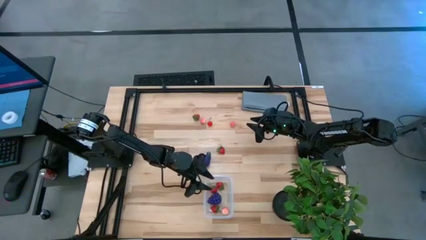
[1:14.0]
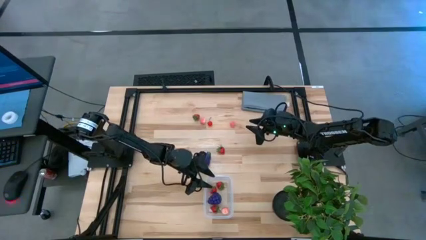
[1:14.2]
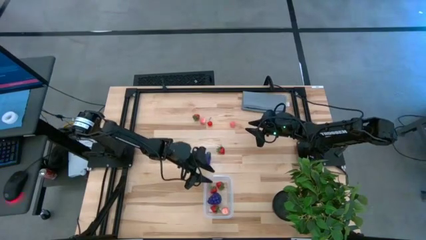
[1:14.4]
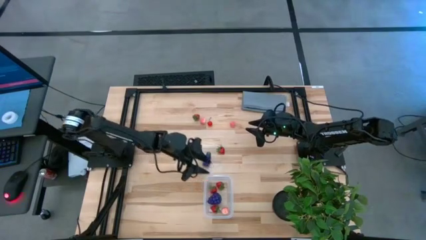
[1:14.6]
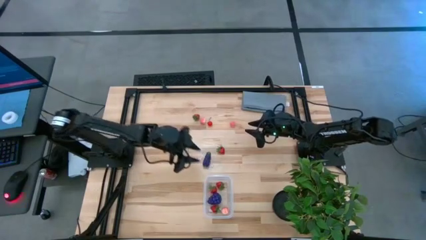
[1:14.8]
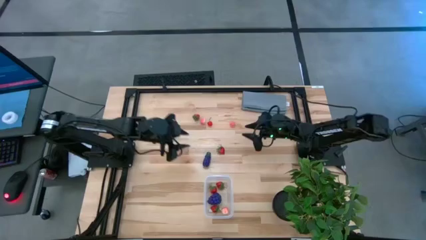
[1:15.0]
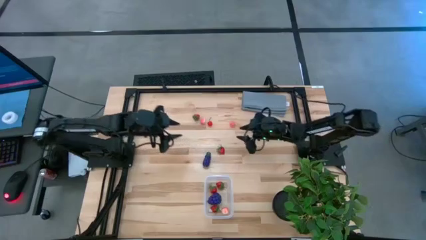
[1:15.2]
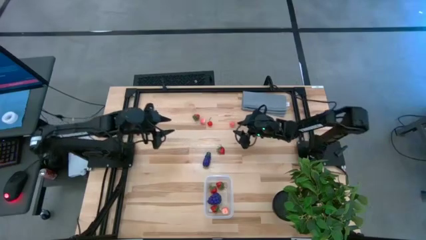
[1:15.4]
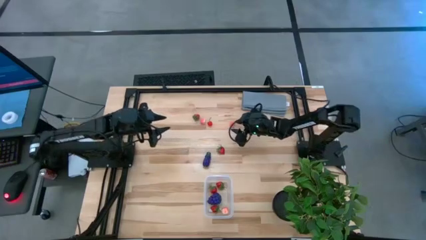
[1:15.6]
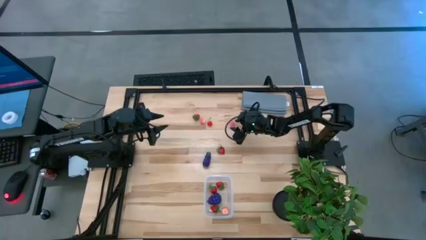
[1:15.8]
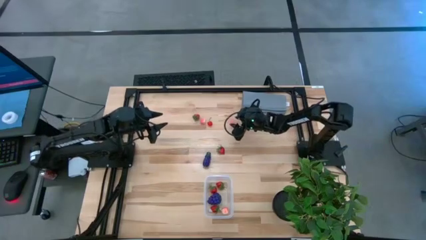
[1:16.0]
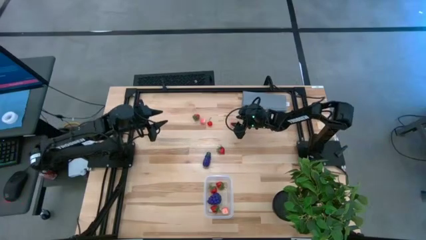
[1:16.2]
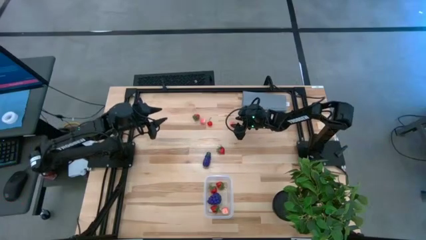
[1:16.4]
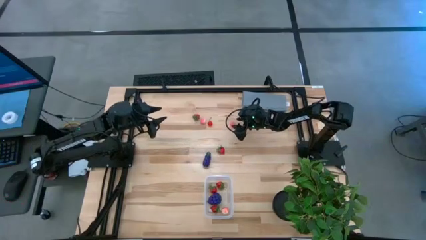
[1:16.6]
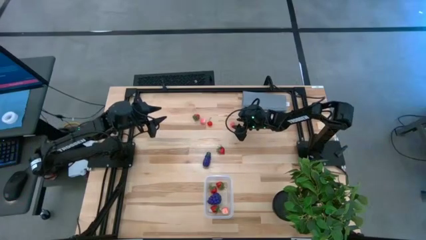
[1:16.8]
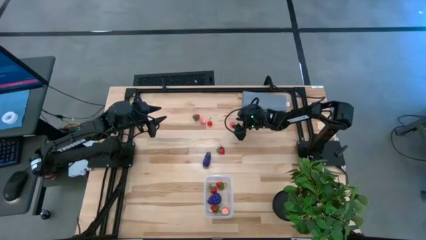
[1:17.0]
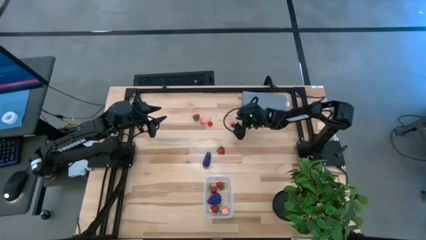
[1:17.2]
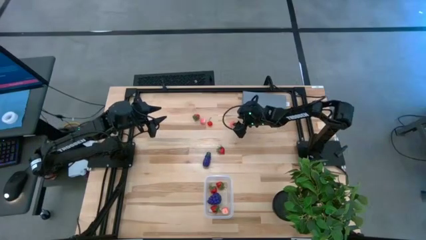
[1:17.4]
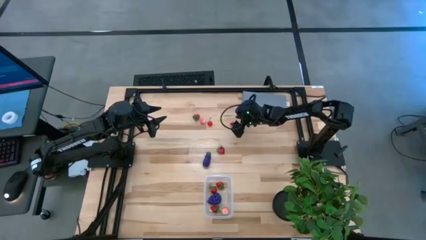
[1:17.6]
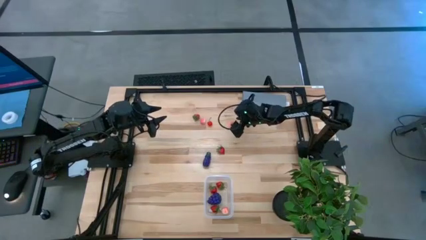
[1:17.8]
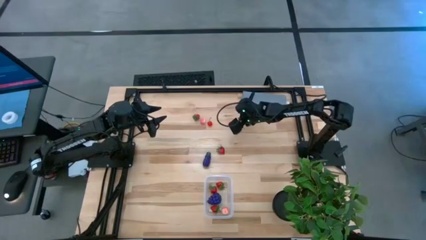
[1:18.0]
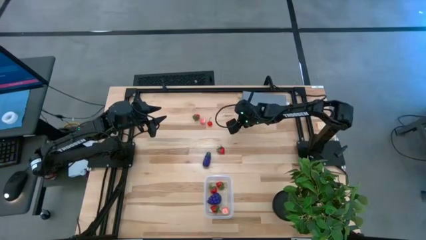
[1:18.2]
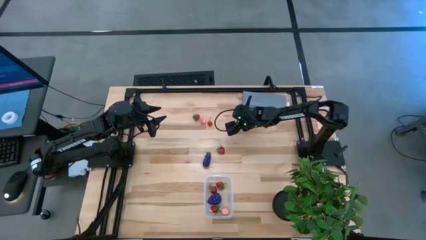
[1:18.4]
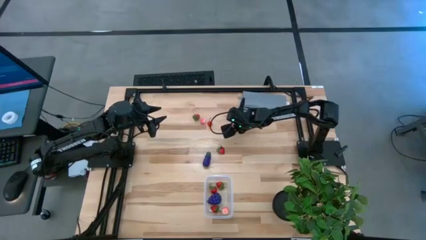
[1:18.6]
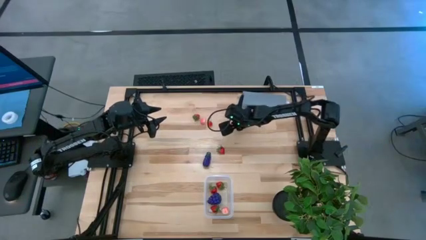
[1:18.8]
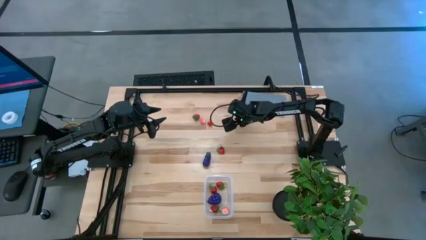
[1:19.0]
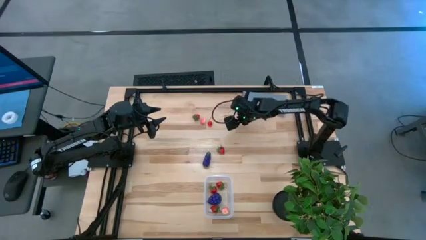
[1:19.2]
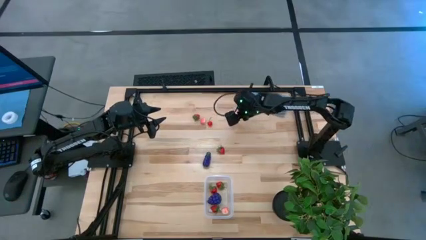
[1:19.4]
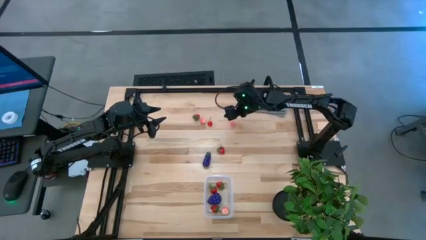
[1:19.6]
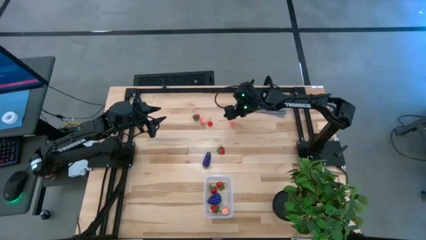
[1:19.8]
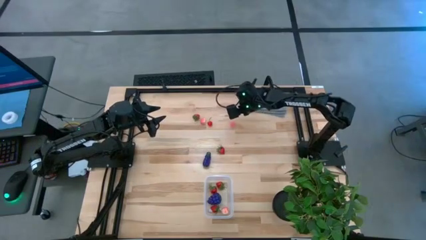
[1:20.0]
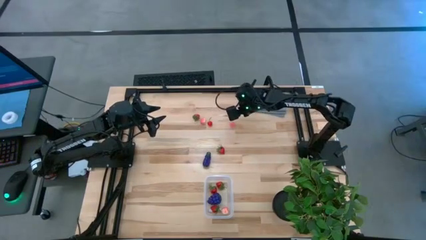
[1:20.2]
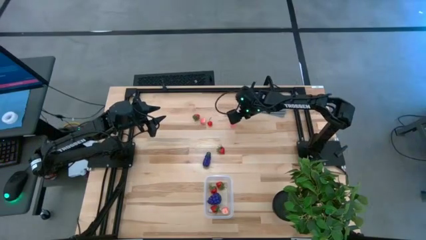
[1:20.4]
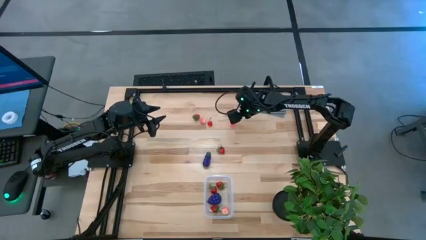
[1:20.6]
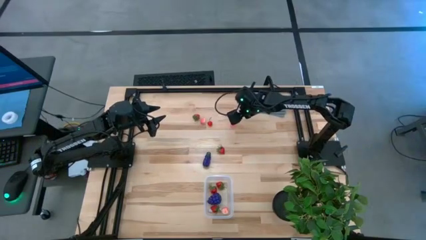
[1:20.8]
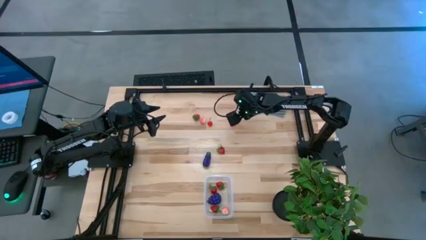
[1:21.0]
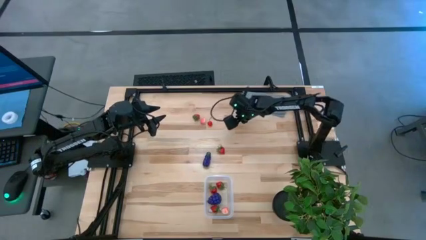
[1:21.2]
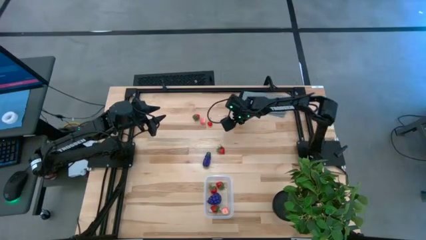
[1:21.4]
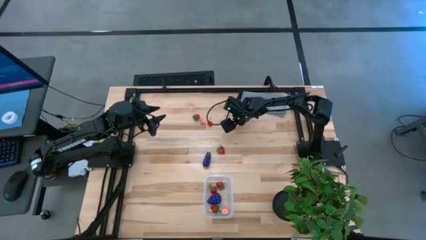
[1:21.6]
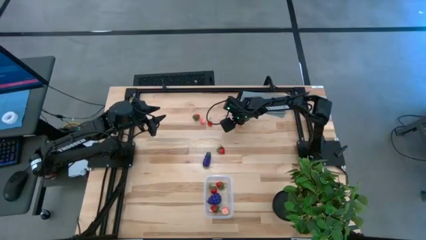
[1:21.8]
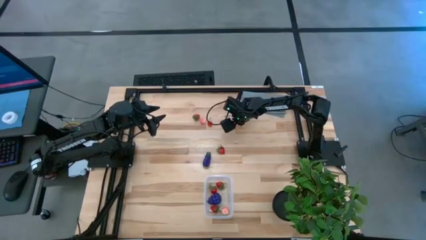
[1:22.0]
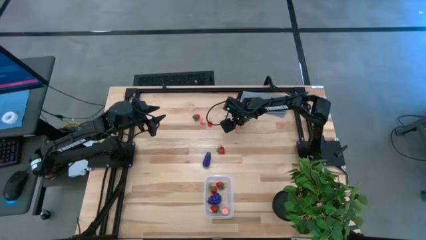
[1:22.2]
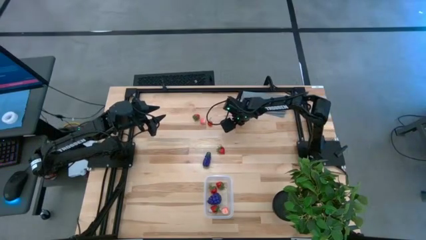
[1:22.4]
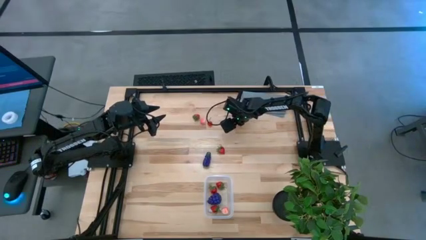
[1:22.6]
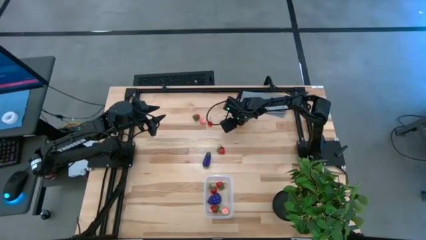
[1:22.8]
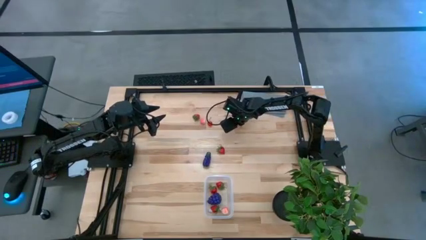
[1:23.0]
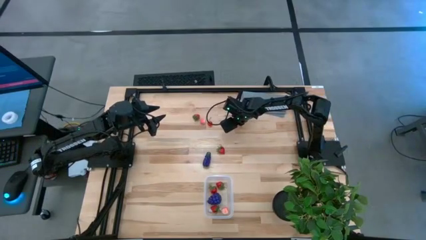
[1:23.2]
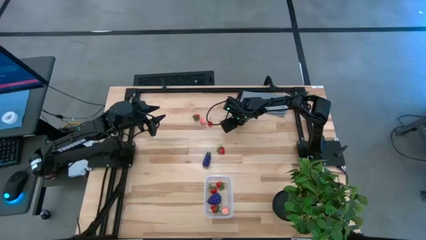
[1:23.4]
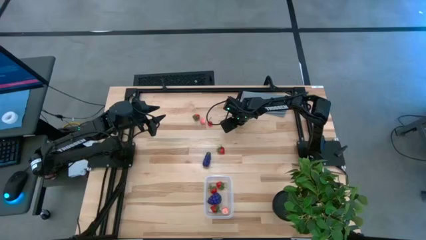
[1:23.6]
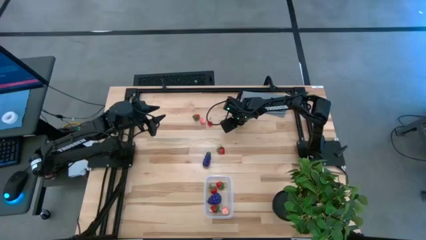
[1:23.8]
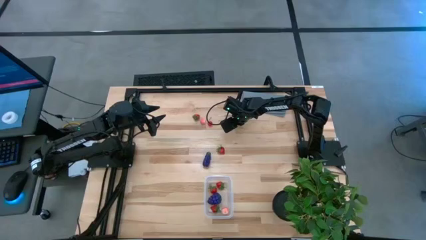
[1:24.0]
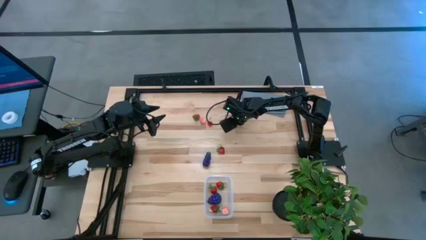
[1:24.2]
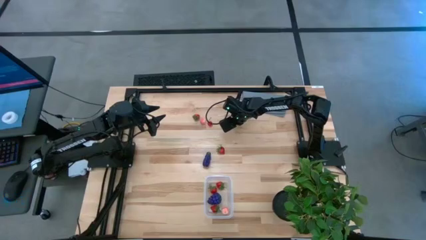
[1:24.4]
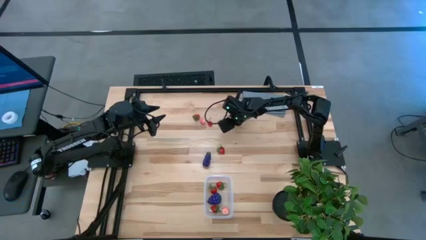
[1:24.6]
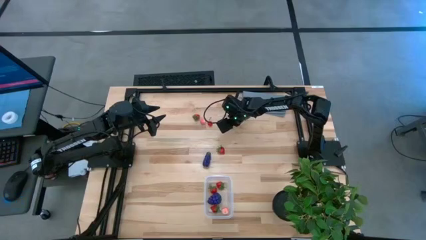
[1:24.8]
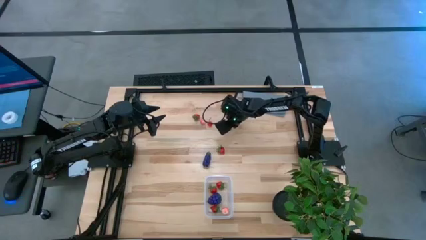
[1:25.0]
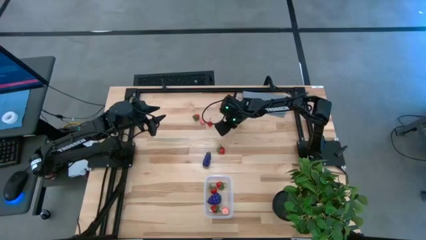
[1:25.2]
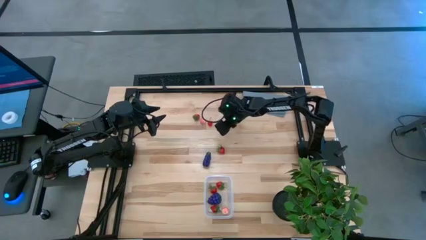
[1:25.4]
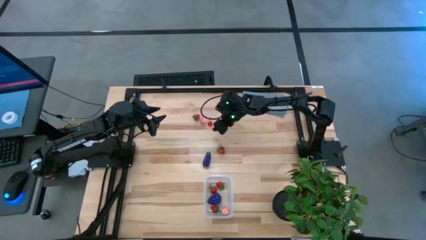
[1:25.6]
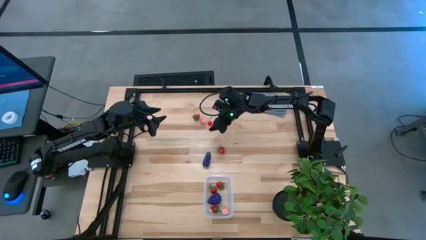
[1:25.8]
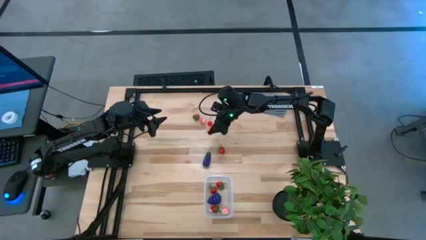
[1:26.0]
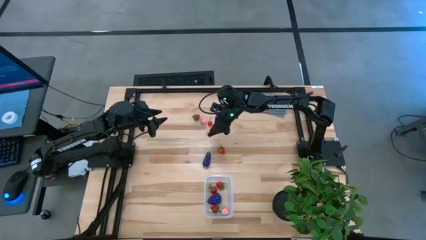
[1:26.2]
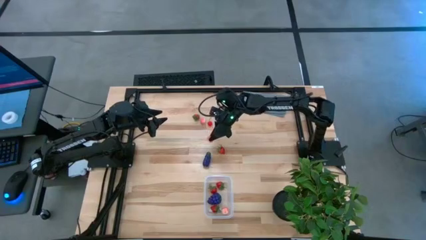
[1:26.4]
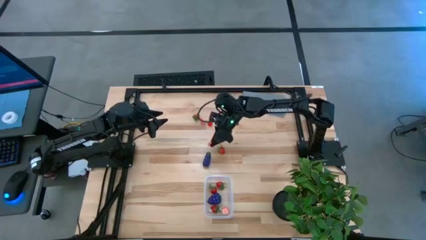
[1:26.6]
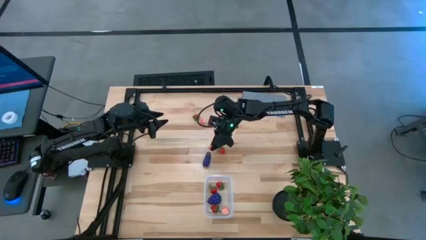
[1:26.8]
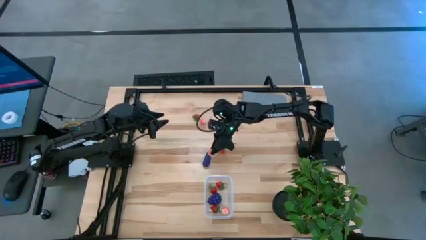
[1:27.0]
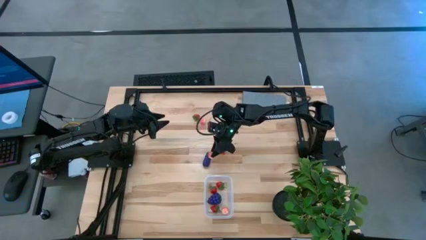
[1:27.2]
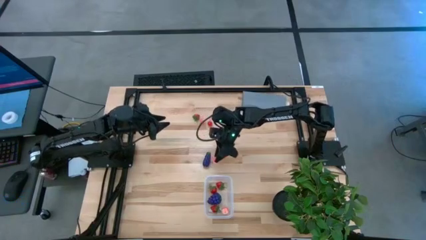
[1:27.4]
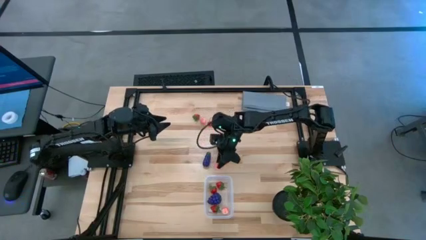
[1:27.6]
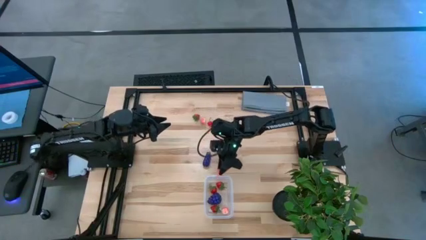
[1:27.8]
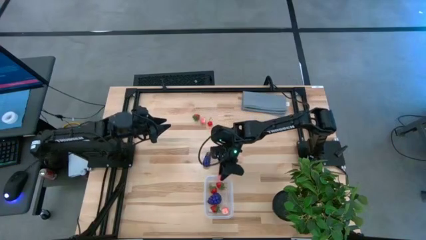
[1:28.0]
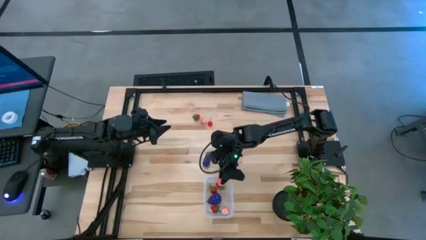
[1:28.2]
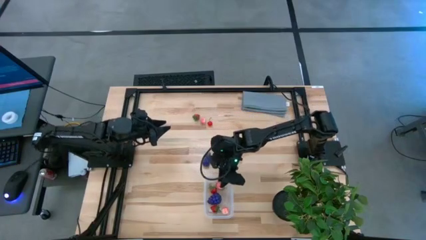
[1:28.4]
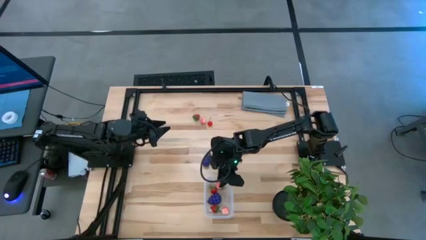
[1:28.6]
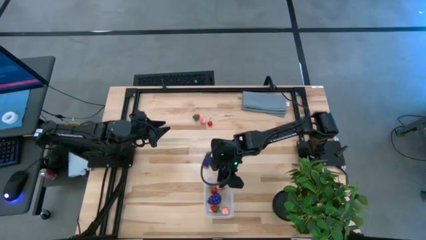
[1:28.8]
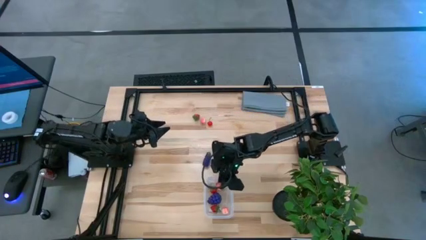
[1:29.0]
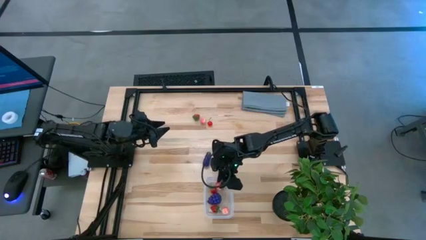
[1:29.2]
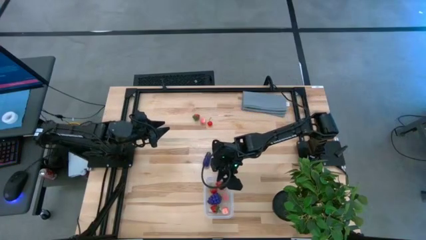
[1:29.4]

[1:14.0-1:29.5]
Task: Pick and placing Produce into tupperware
Put the pink peach into the transparent bin

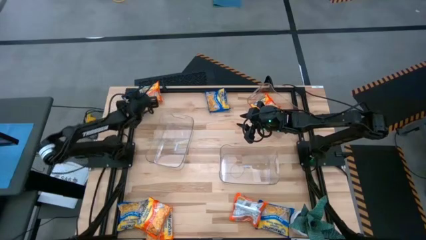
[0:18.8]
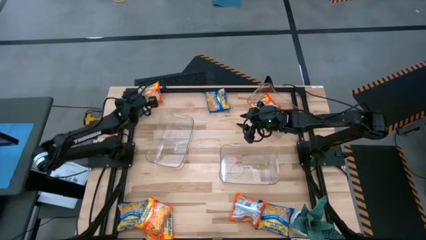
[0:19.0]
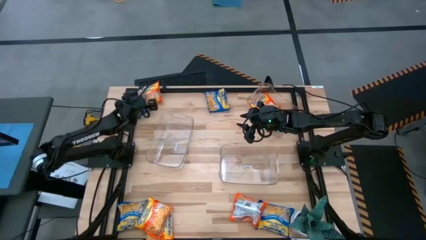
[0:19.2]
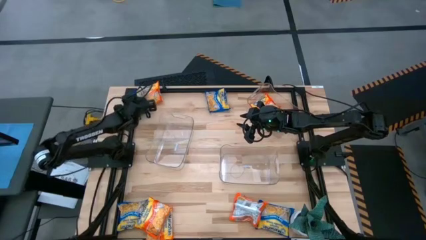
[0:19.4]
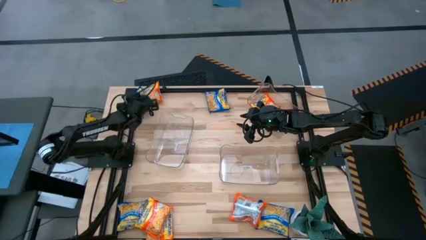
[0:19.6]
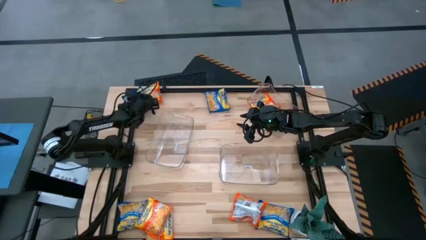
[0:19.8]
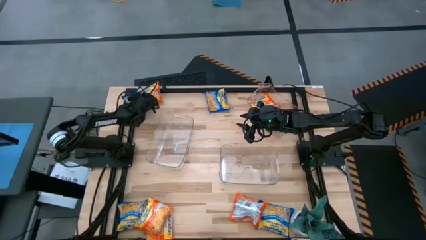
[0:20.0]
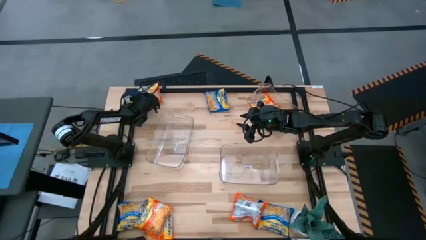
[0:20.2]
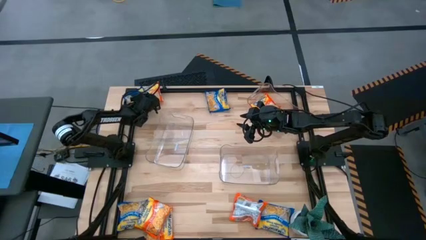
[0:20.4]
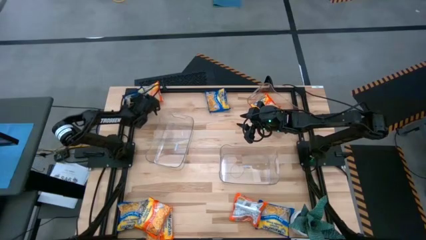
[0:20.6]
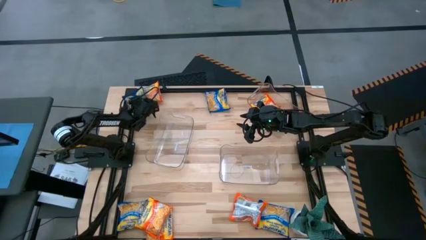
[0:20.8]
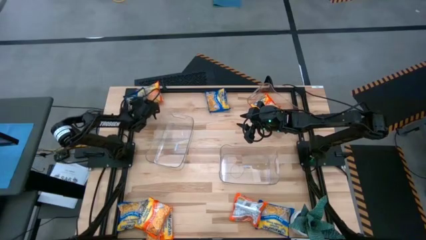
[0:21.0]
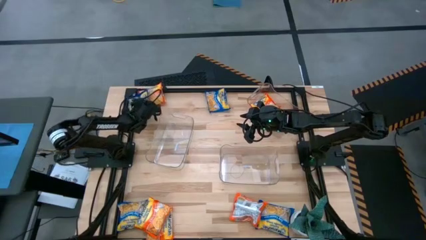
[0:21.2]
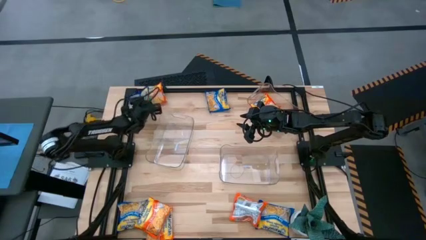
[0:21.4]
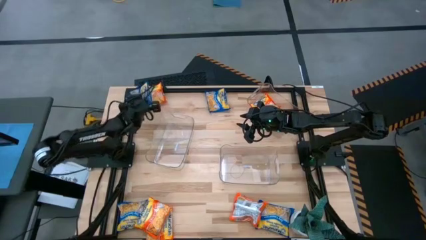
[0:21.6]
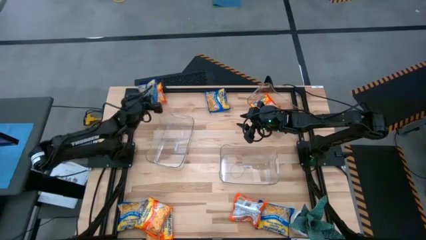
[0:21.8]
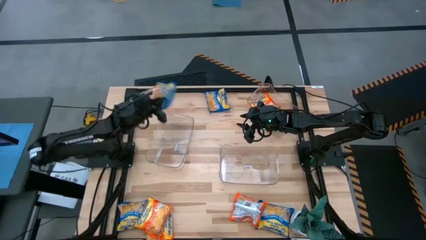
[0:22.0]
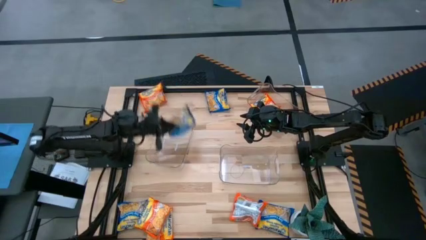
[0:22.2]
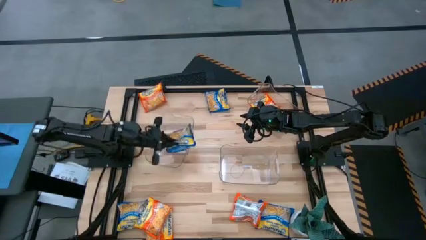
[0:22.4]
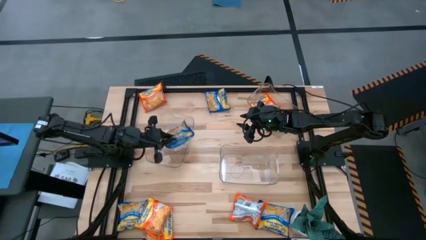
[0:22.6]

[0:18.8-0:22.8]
Task: Sort Maruchan noodles
Put the blue noodle pack into the middle transparent bin
